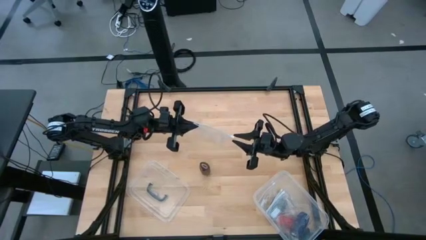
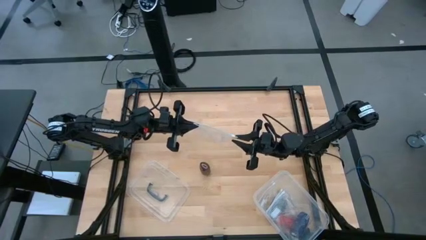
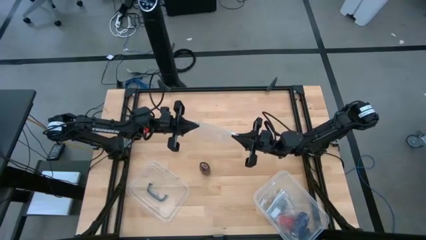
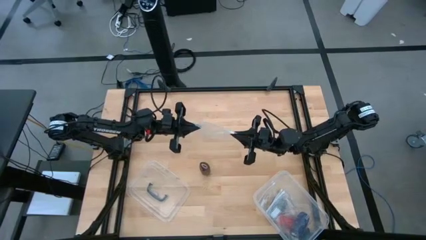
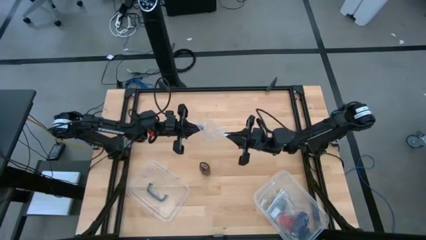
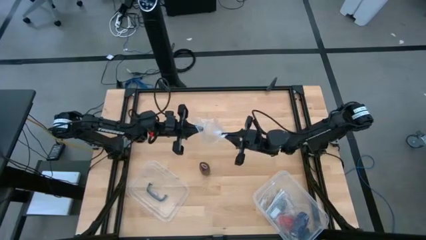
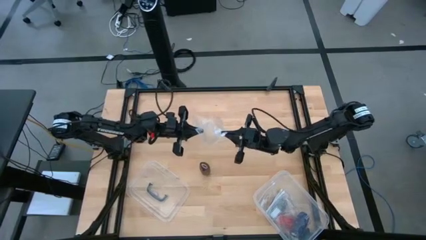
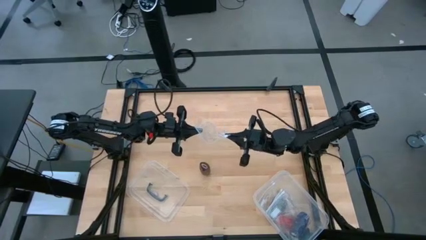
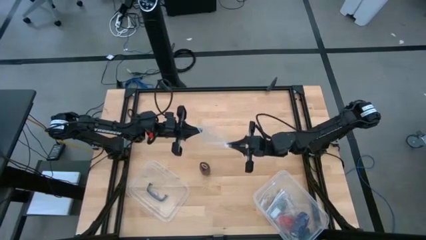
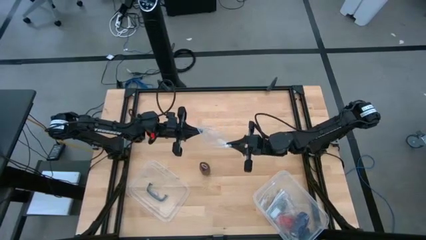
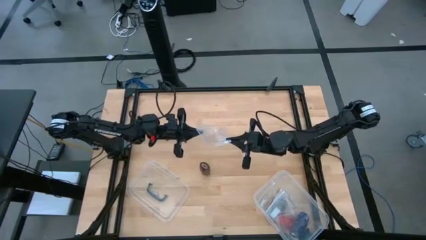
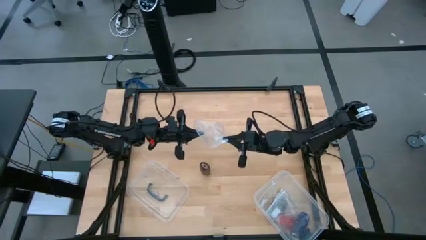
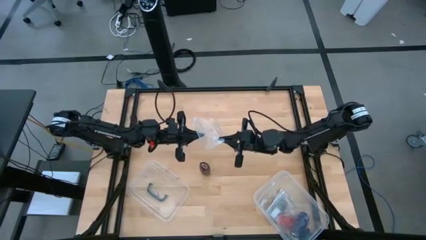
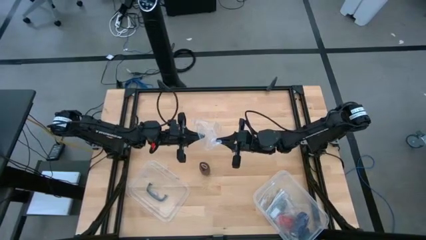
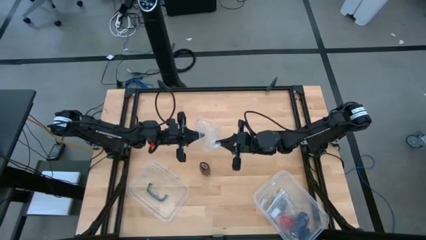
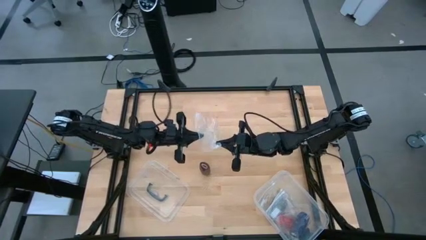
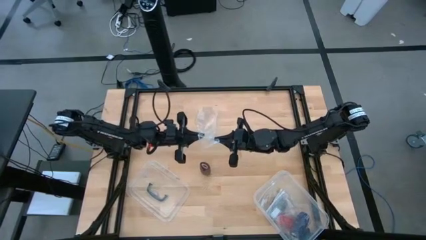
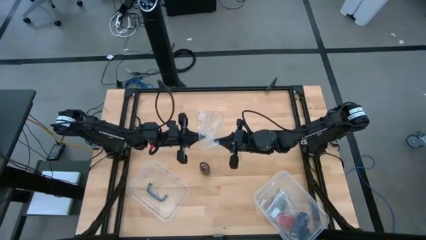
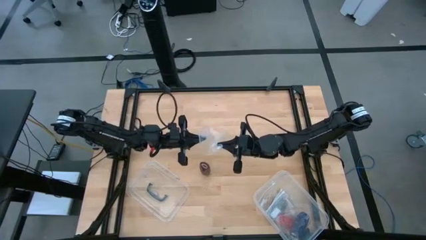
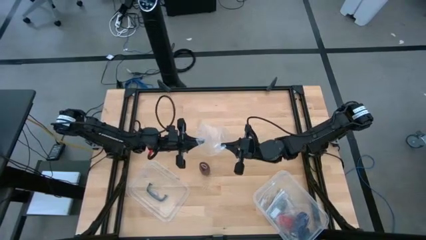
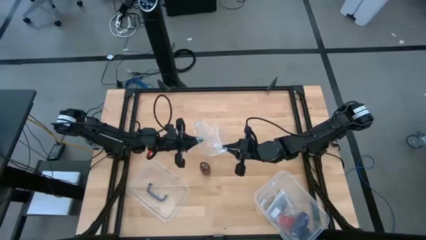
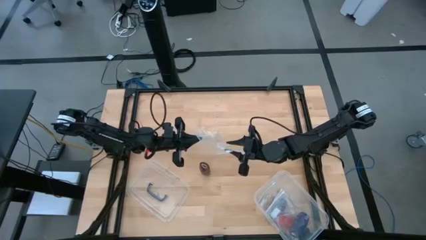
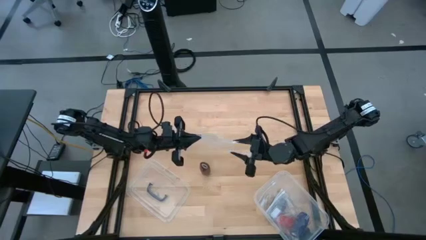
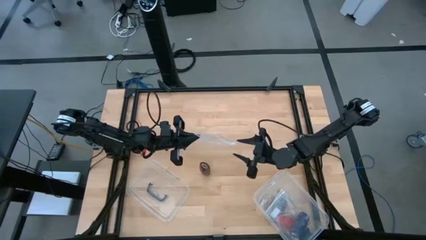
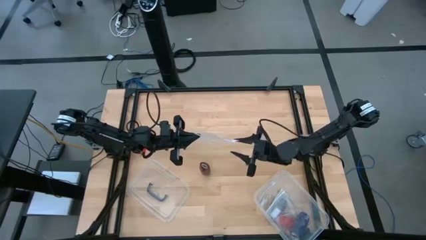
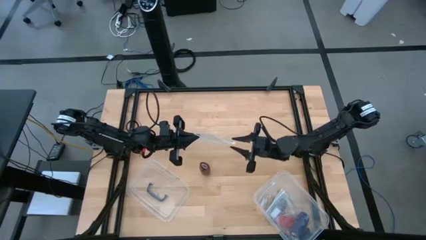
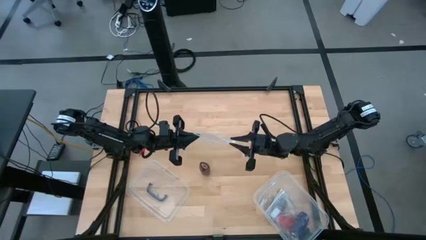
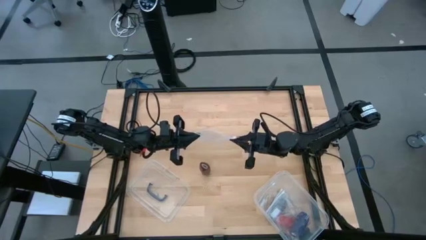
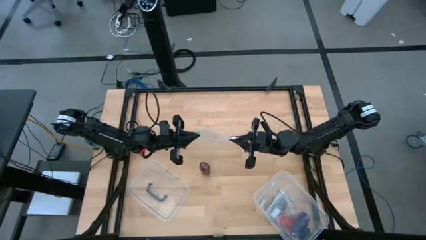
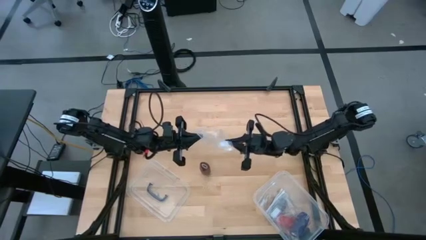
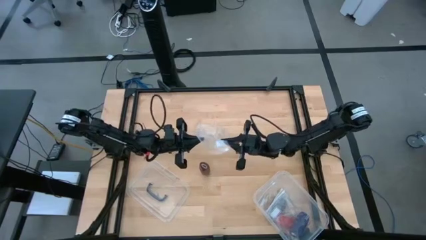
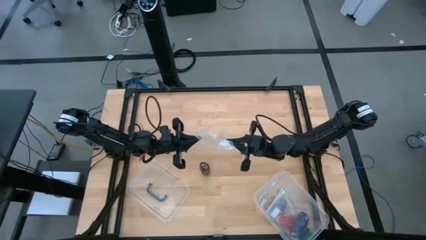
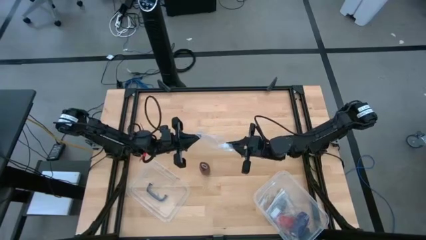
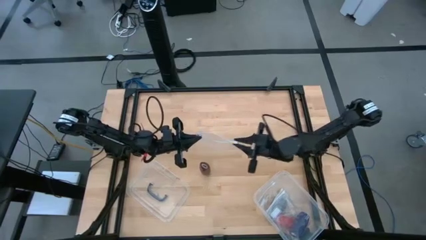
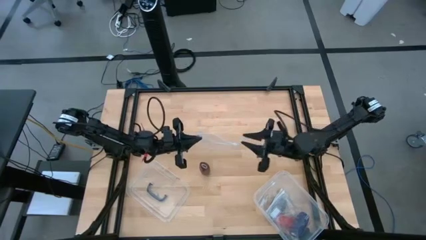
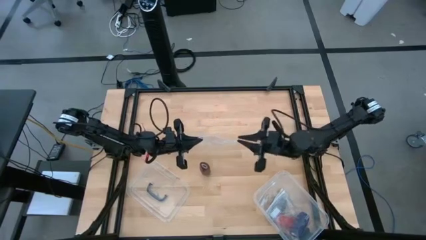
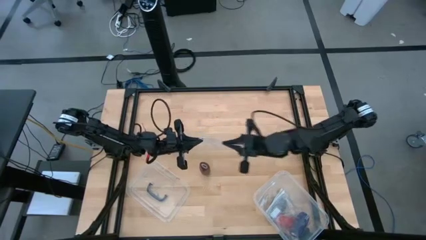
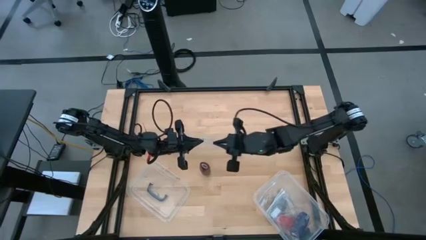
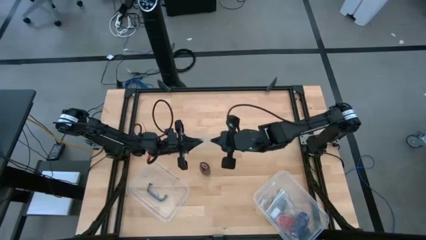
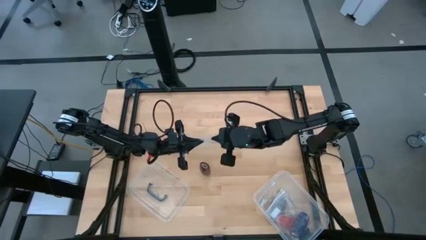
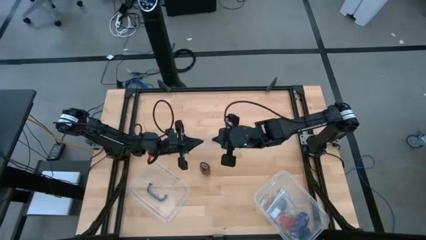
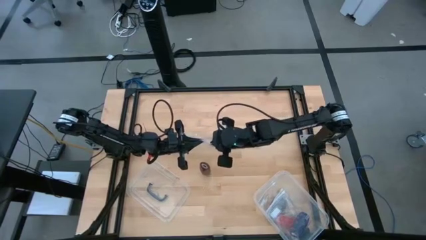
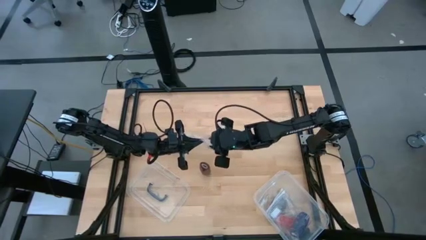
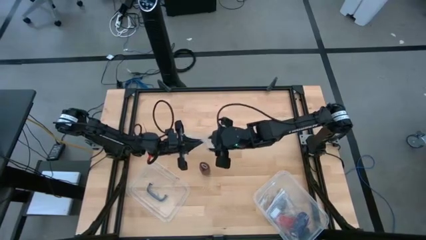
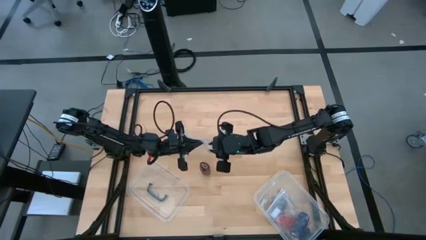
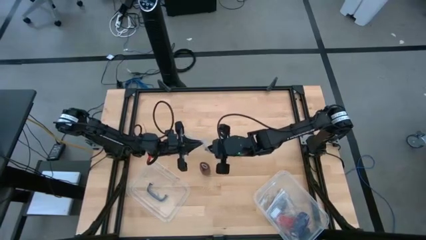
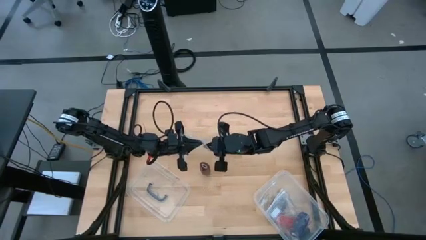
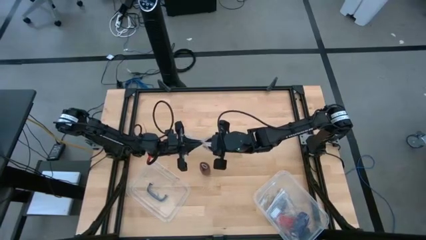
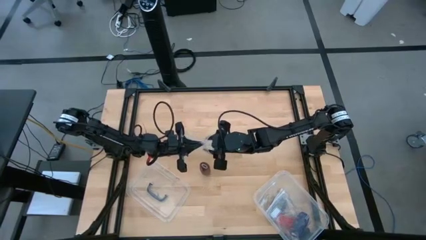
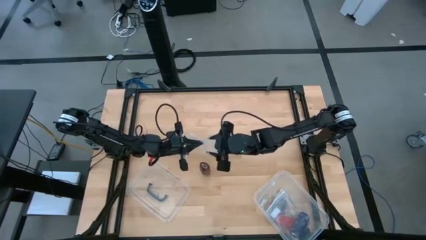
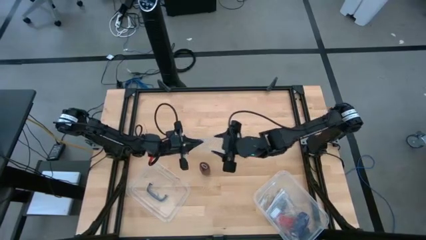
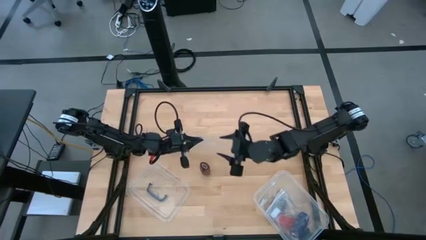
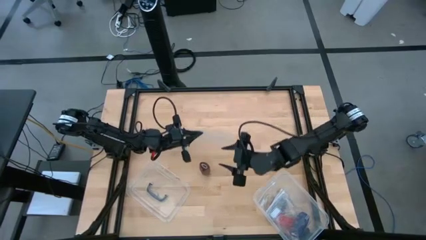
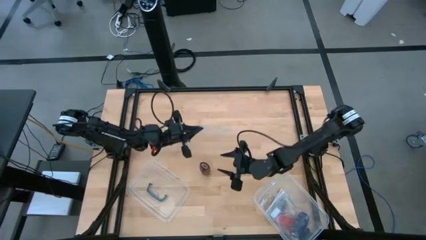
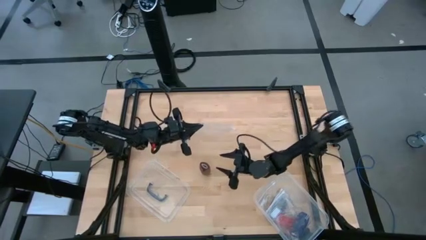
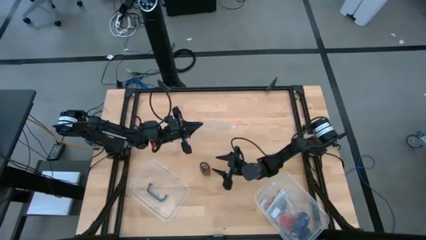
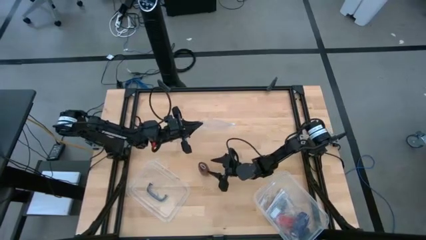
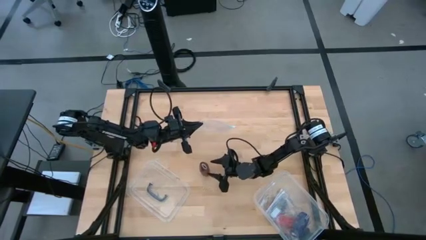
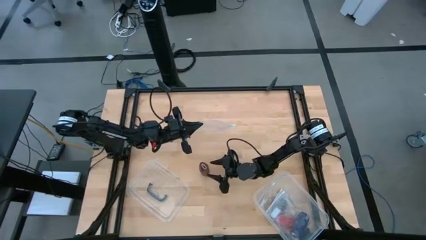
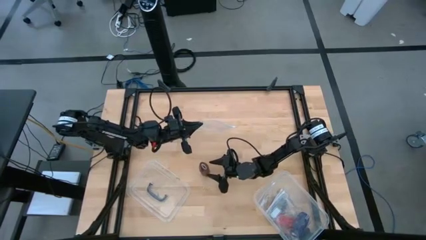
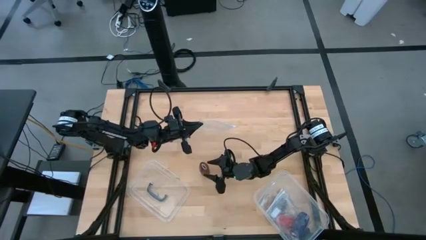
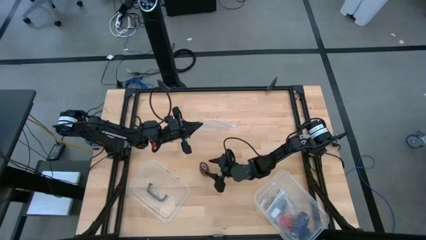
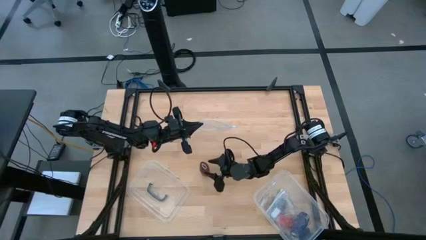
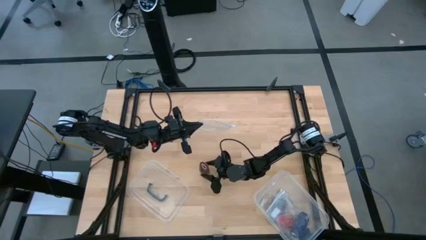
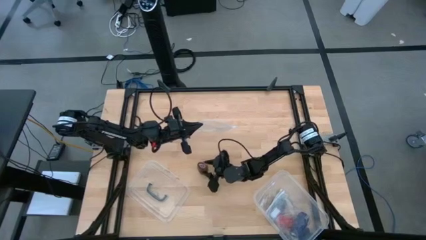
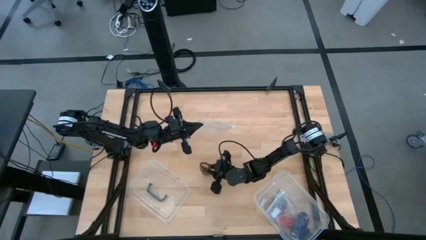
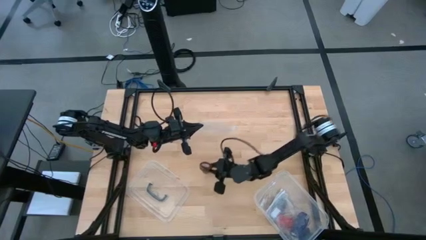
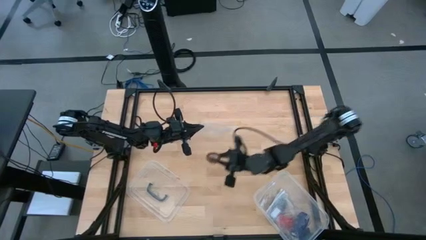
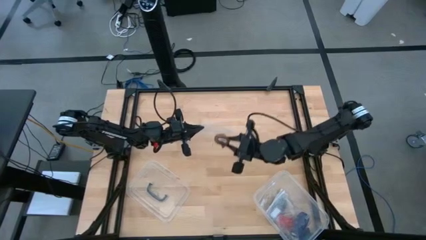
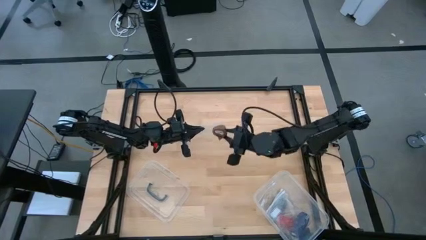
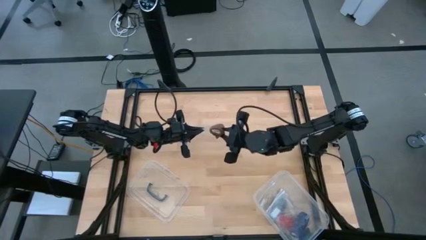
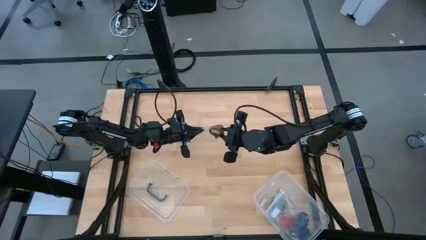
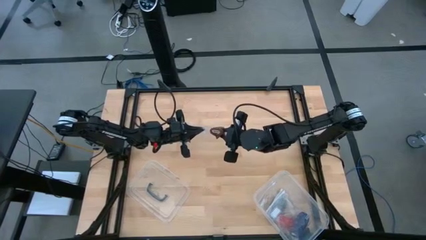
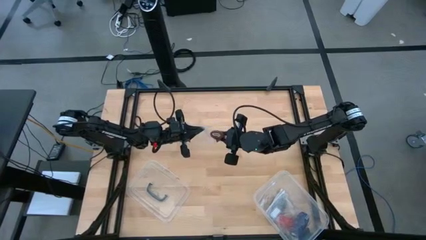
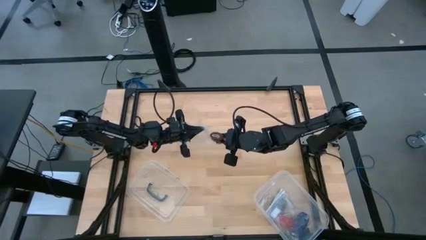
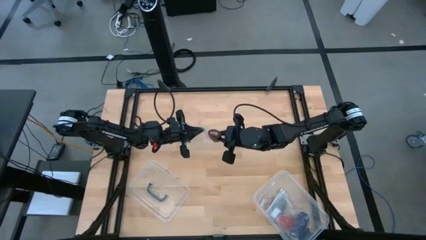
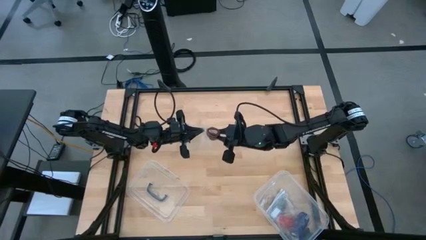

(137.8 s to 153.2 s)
Task: Roll bandage
Put the rolled brown bandage into the transparent zip bag

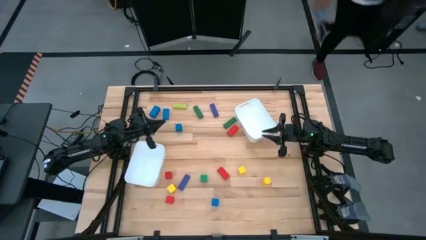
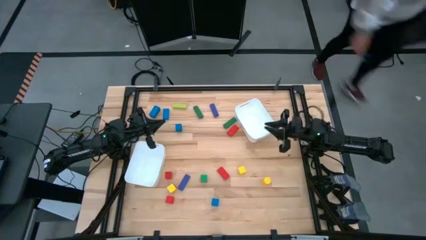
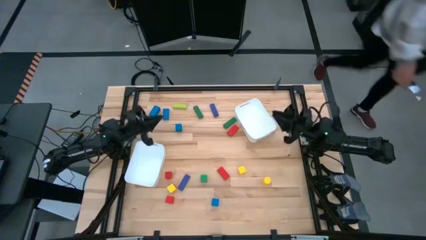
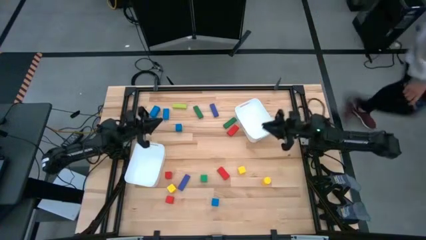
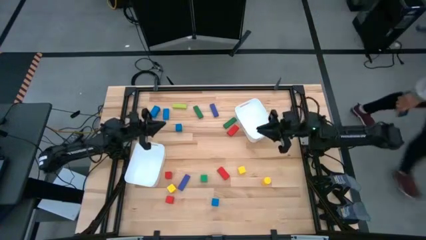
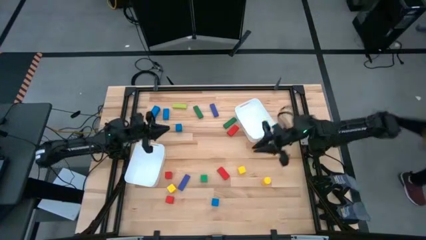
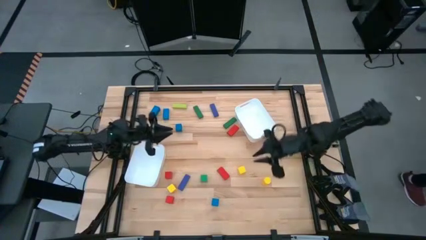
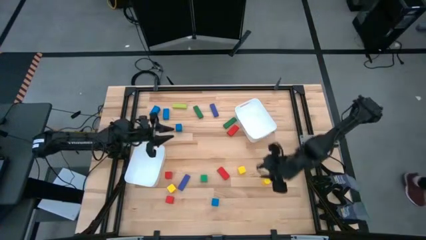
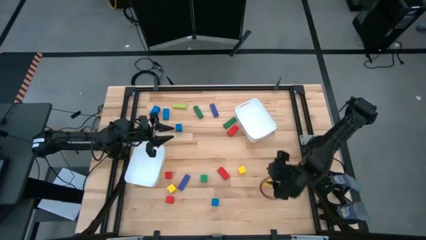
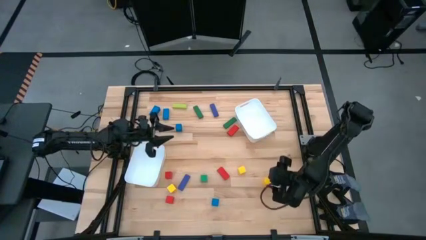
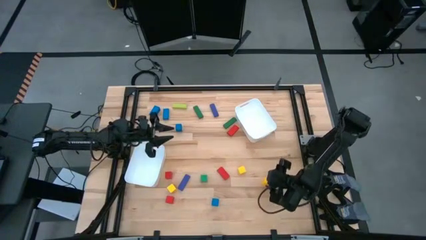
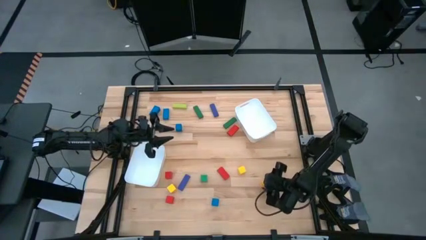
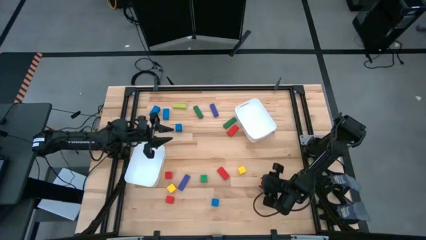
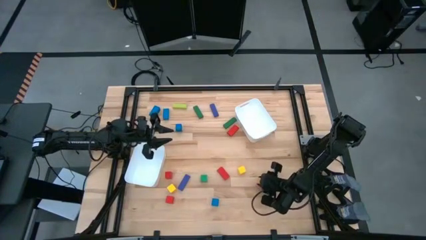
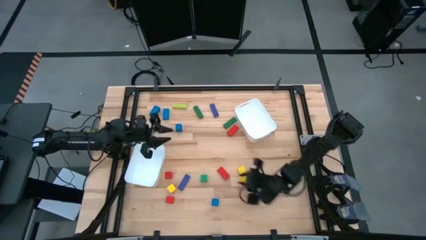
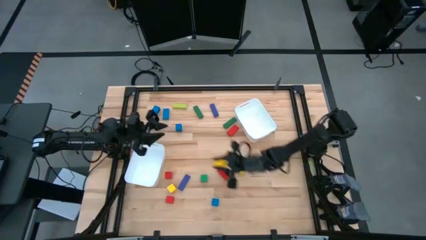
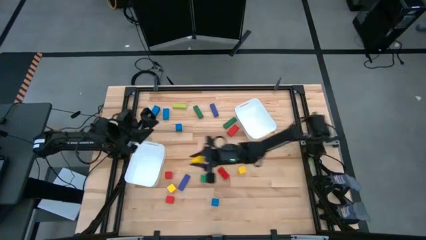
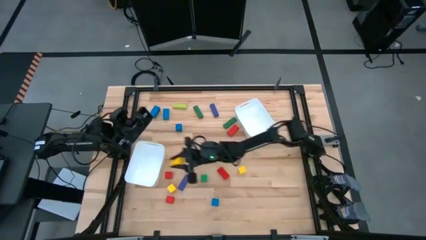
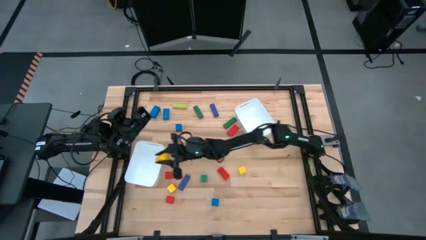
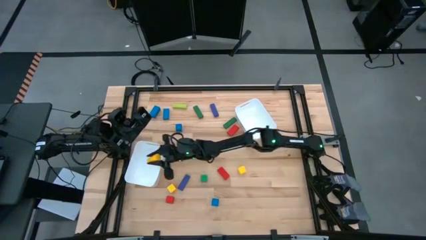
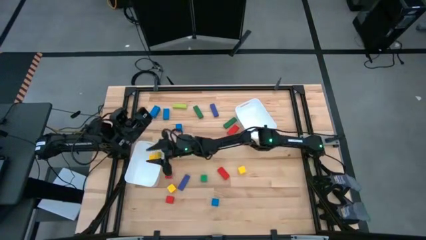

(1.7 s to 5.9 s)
Task: Sort blocks by size
Put the large yellow block into the left white bin
